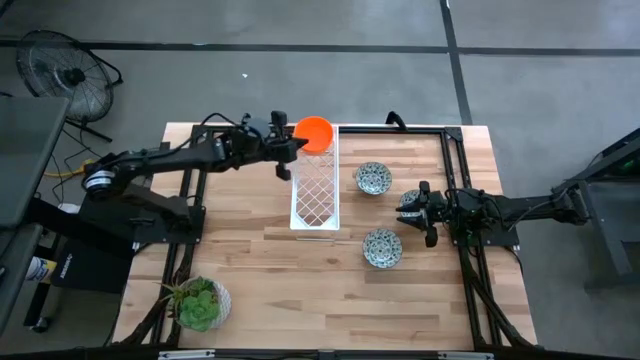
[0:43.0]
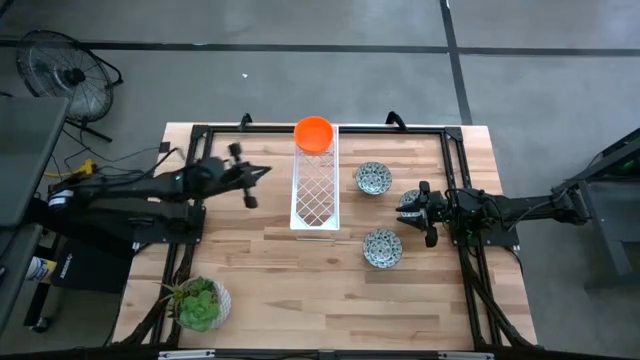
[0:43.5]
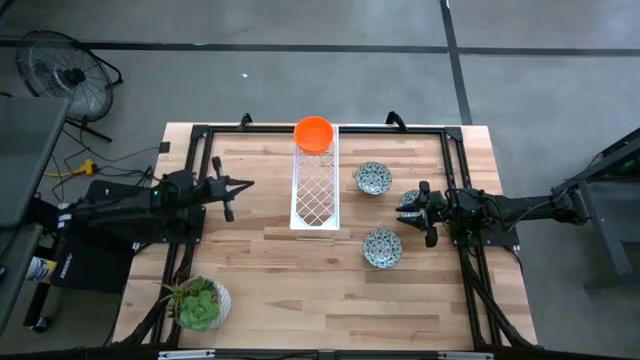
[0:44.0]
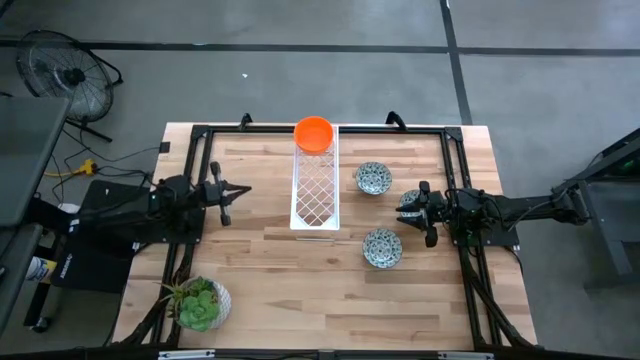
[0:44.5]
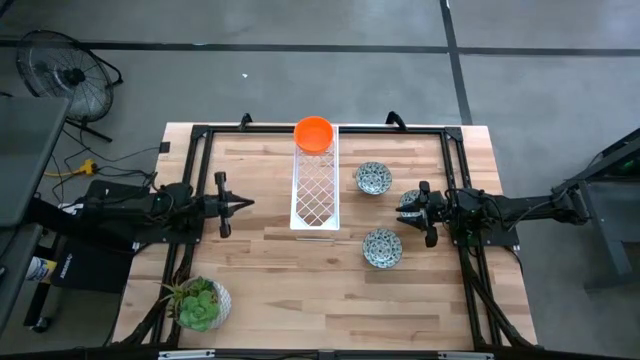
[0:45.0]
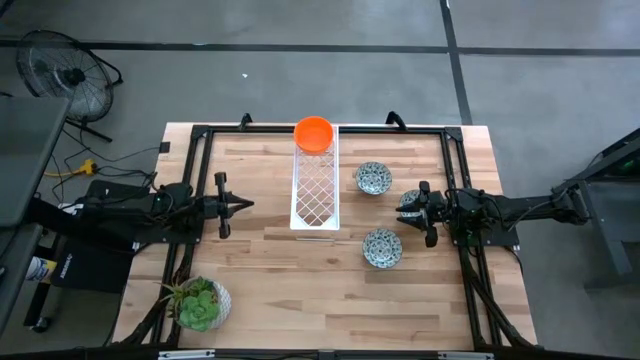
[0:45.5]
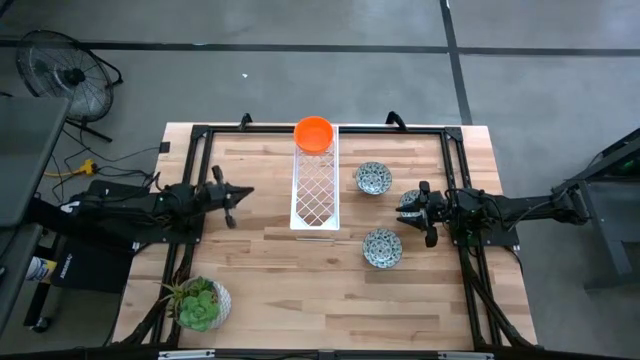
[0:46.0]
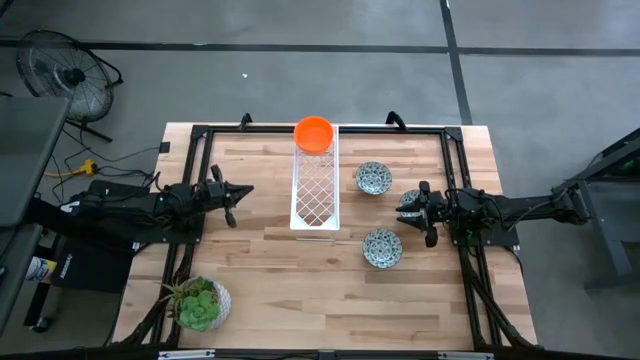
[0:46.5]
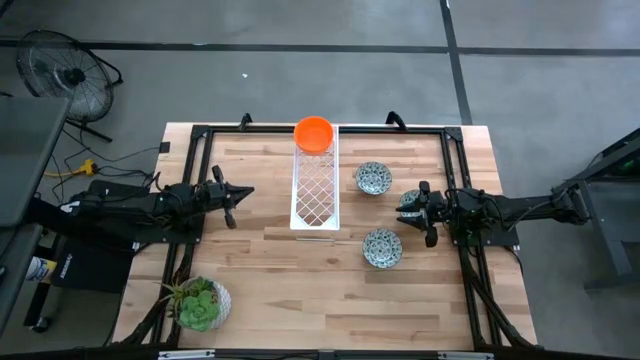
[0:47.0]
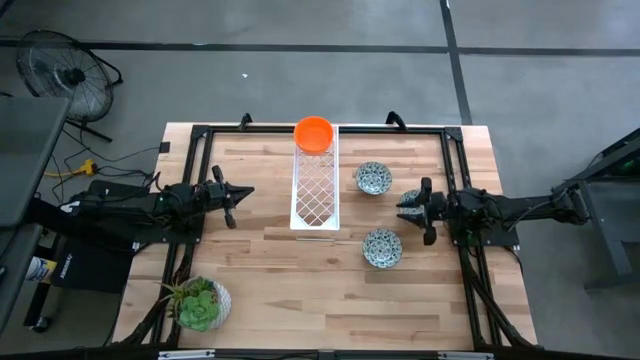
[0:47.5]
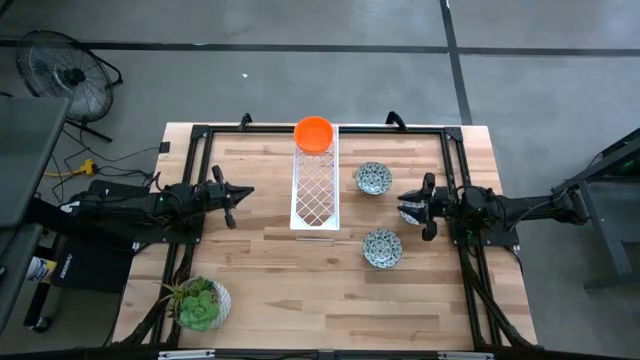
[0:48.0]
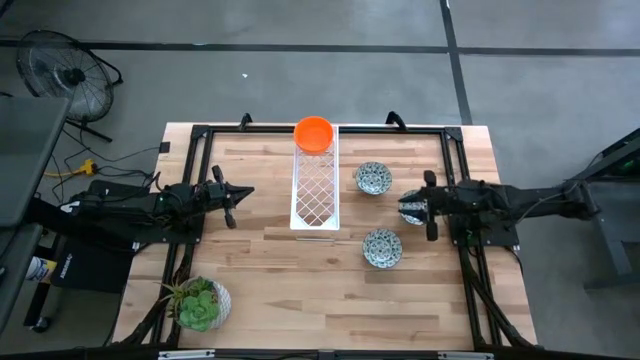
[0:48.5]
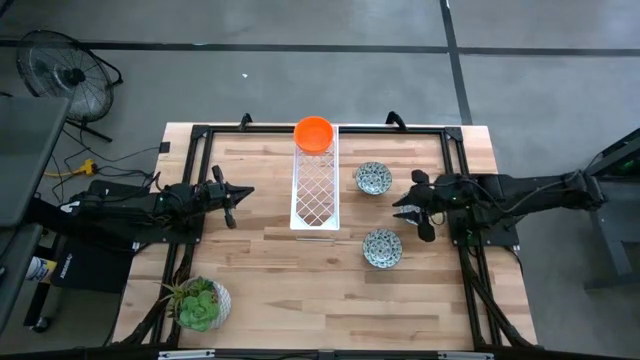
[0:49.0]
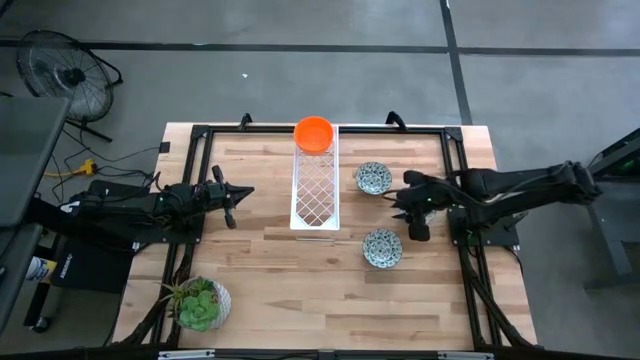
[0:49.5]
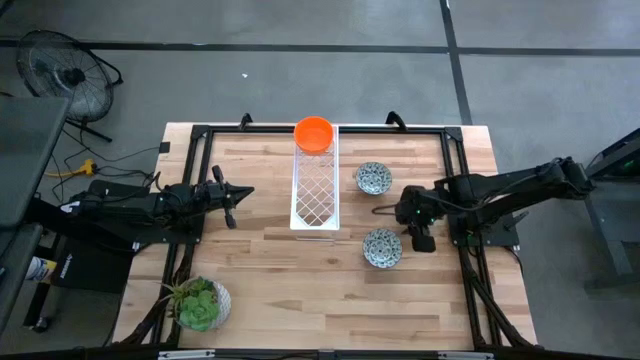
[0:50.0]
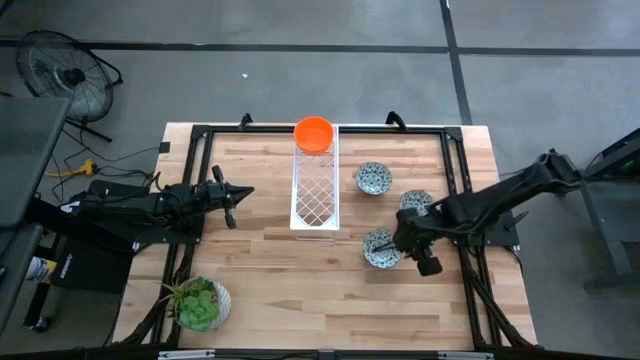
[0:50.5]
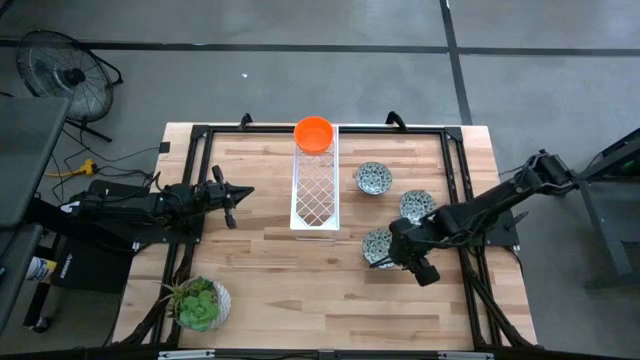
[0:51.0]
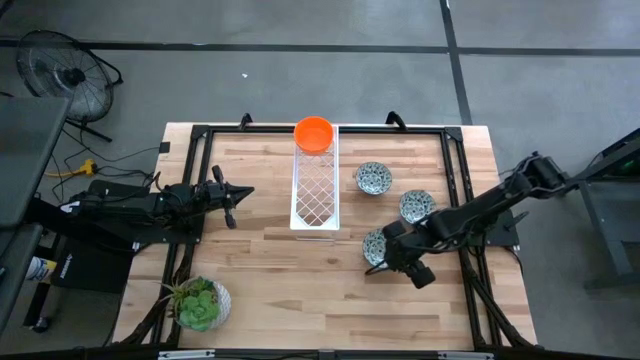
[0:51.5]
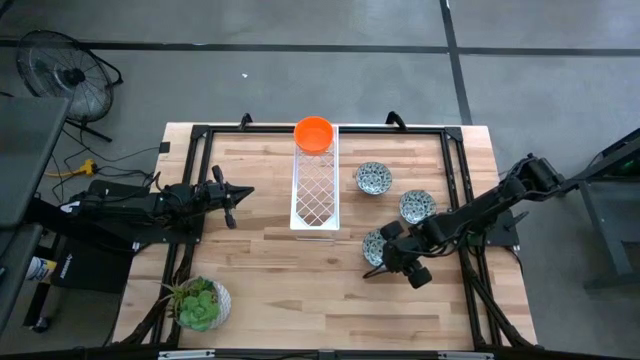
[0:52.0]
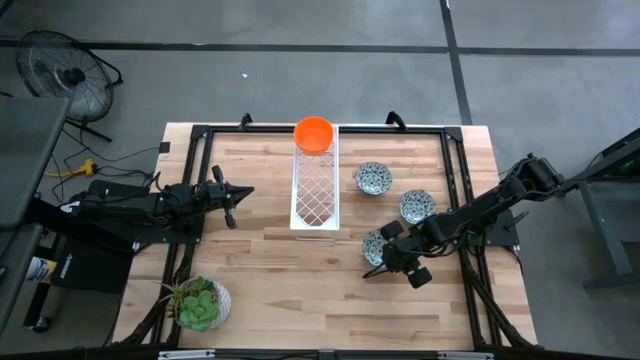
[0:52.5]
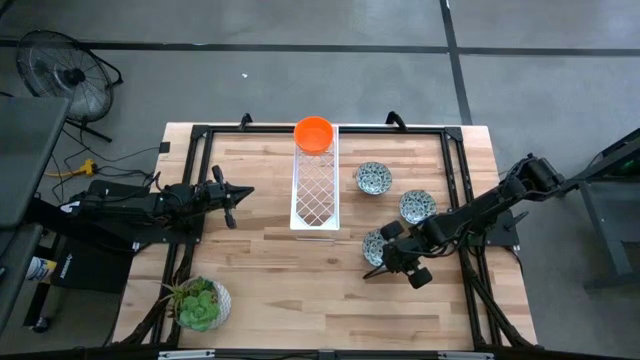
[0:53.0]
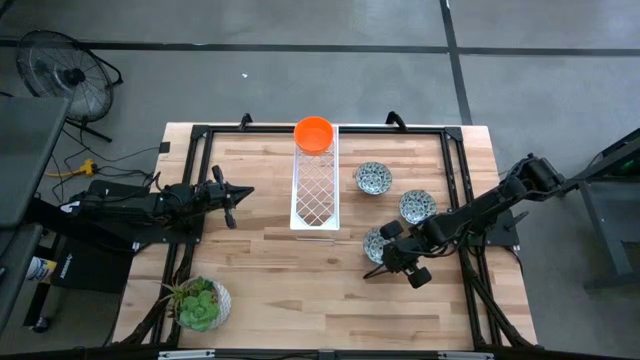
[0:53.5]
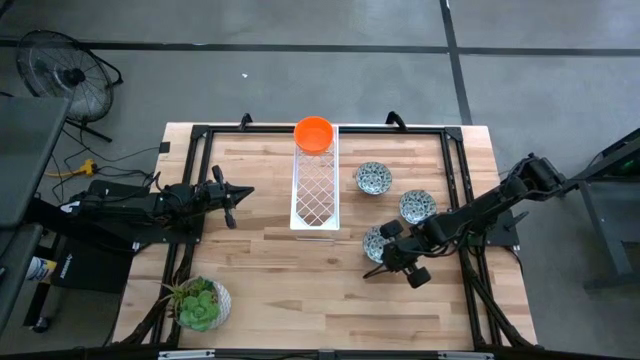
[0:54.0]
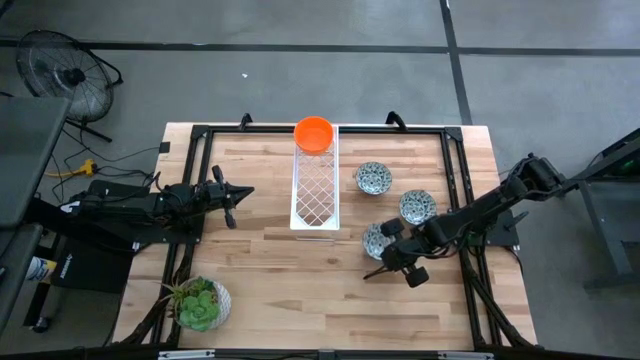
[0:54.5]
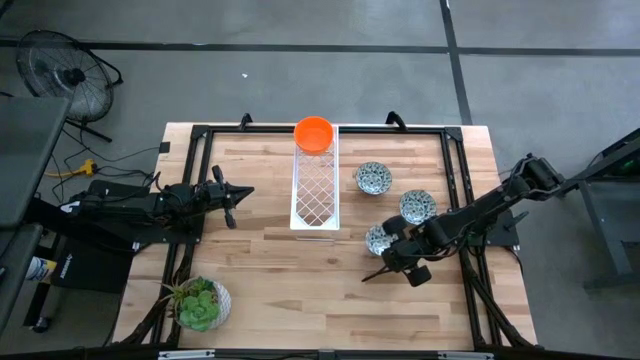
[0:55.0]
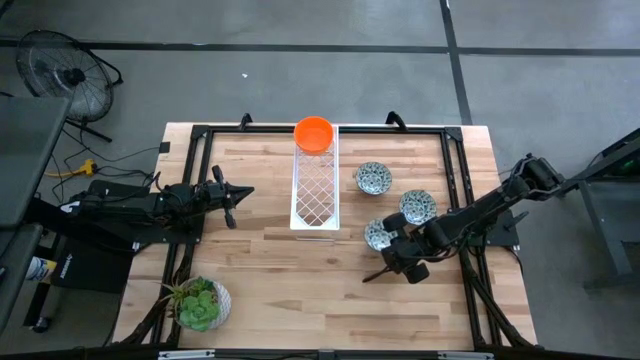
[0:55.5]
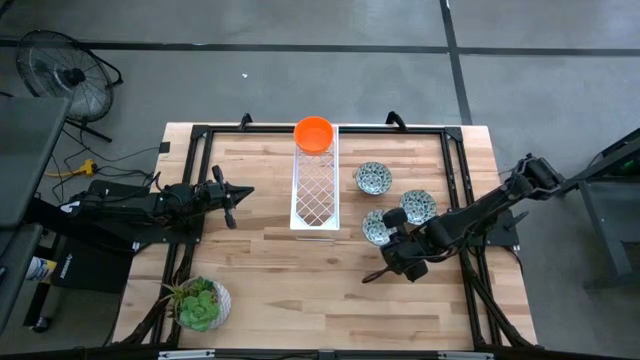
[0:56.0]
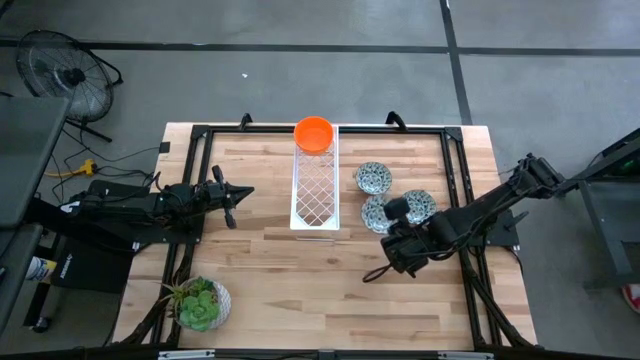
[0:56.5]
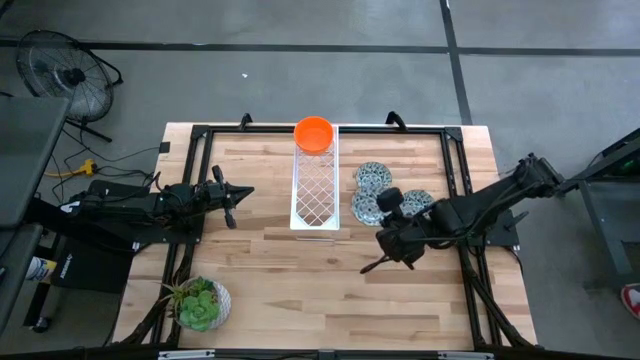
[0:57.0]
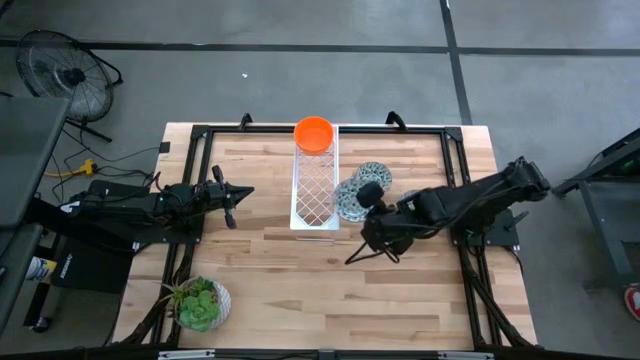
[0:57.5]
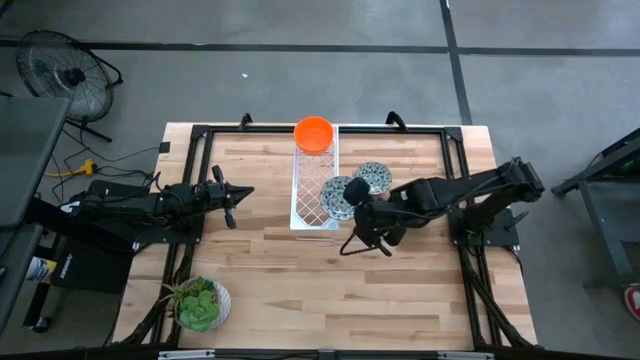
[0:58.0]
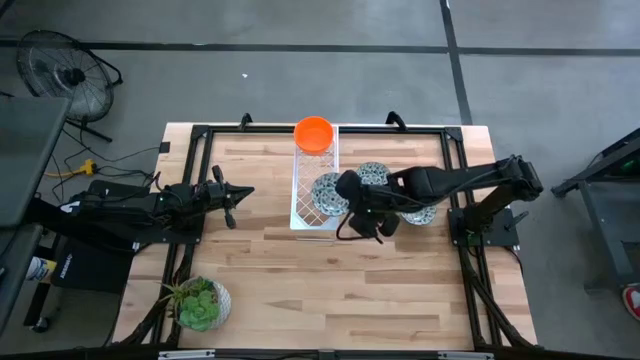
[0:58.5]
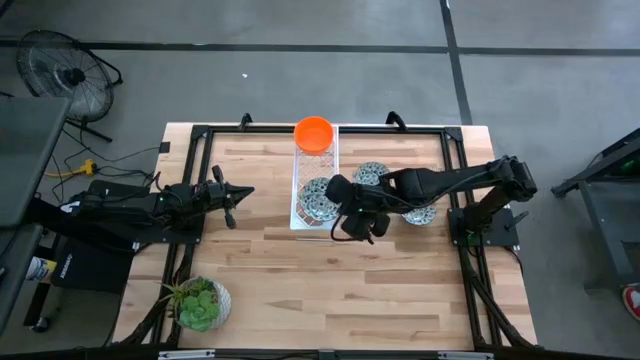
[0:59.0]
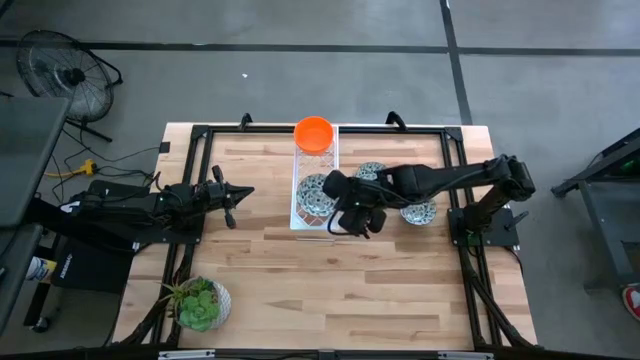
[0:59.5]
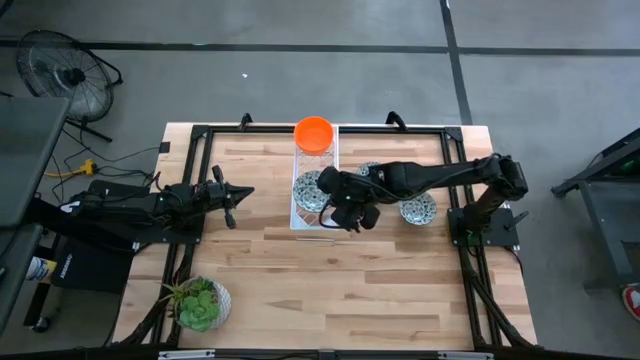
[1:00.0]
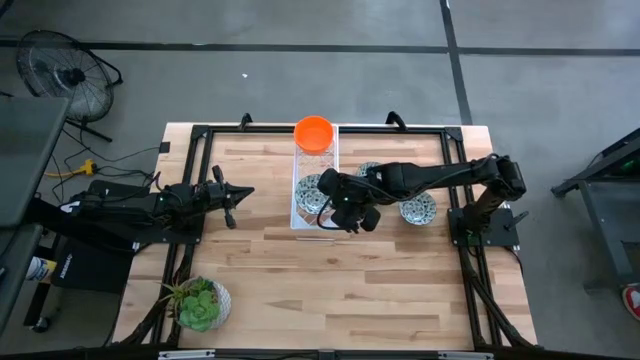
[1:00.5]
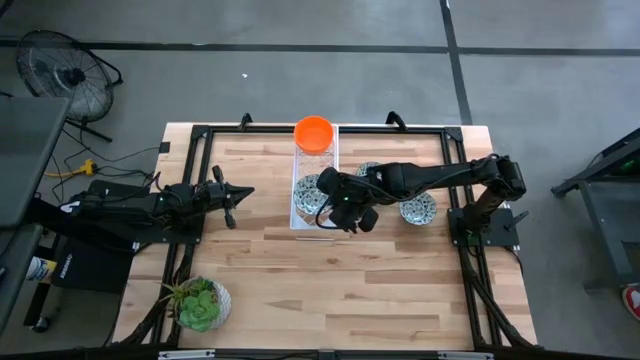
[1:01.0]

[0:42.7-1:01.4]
Task: Pick & Place Mini bowls
Put the bottom blue white pattern bowl on the shelf

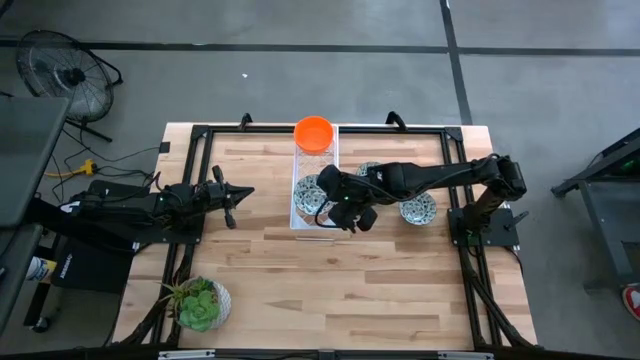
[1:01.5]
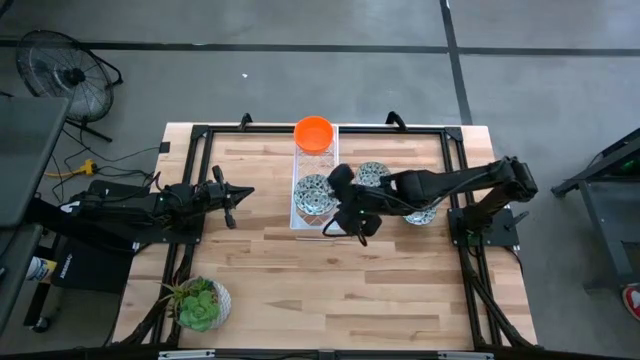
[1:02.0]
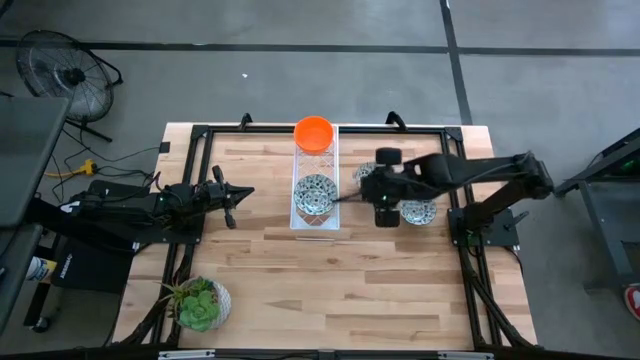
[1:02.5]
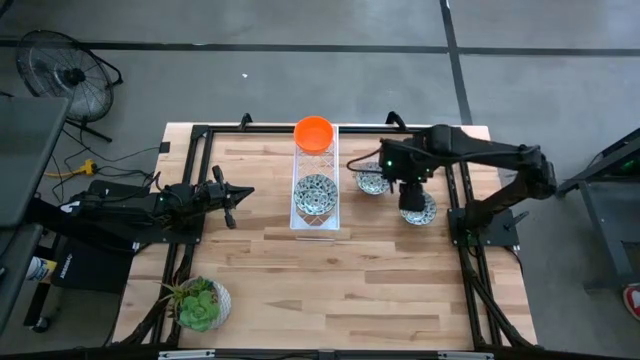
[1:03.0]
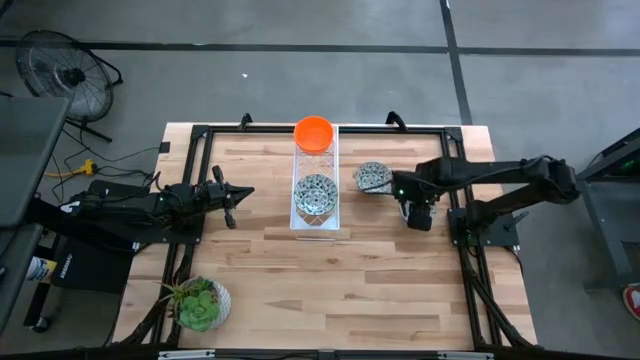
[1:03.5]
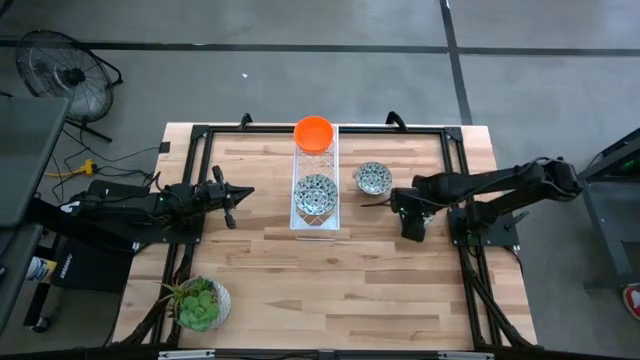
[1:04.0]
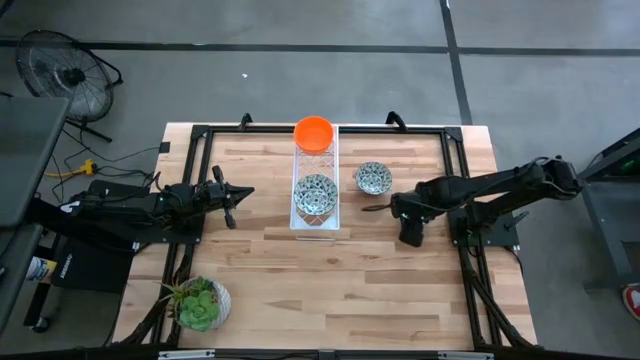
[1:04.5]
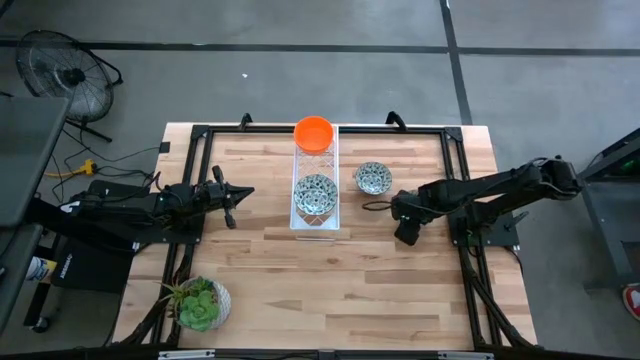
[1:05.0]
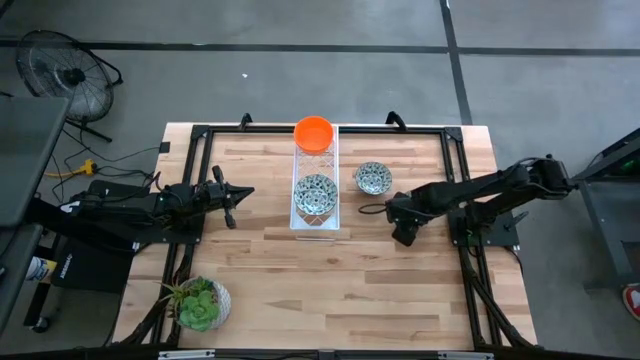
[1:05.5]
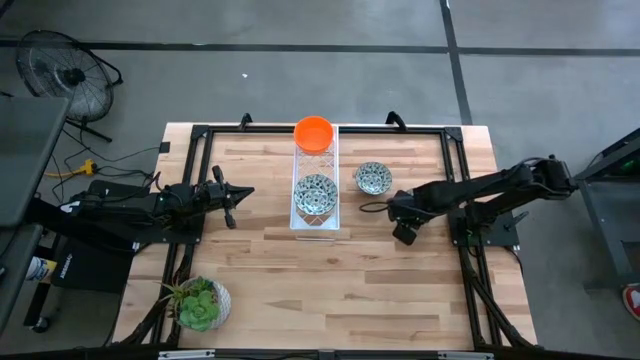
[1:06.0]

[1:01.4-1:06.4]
Stack the bottom blue white pattern bowl on top of the other blue white pattern bowl on the shelf
